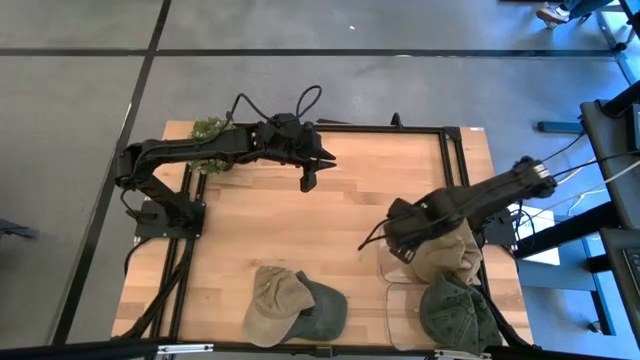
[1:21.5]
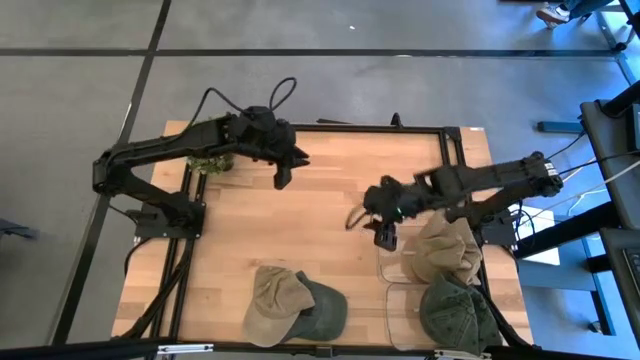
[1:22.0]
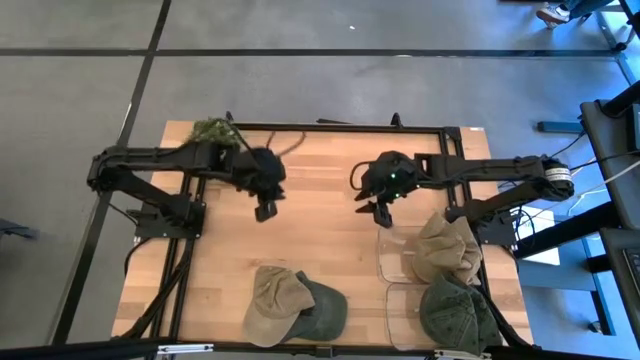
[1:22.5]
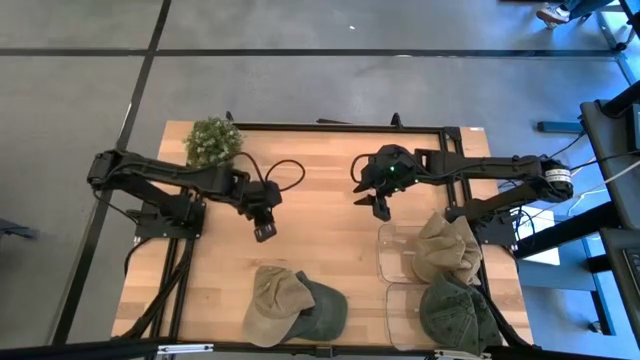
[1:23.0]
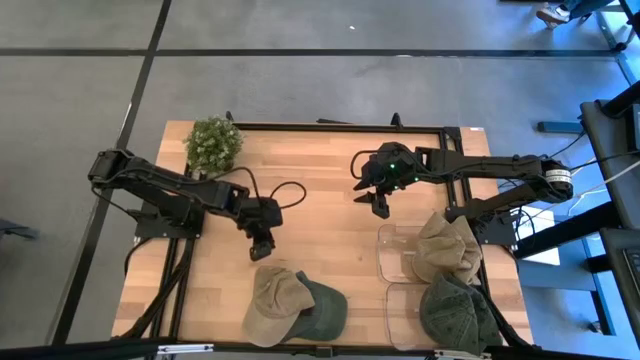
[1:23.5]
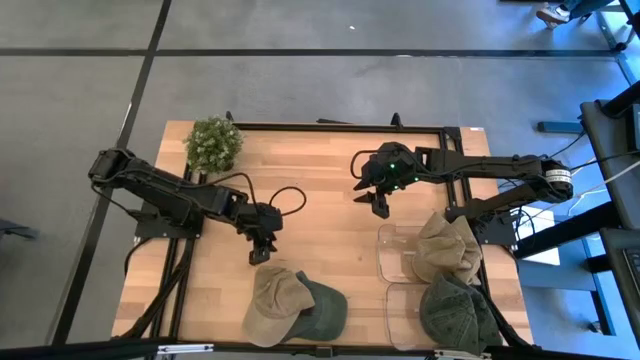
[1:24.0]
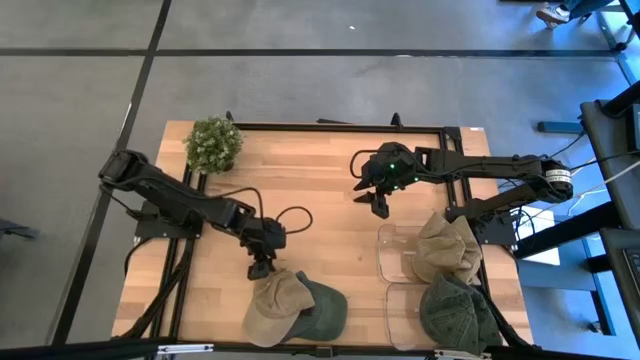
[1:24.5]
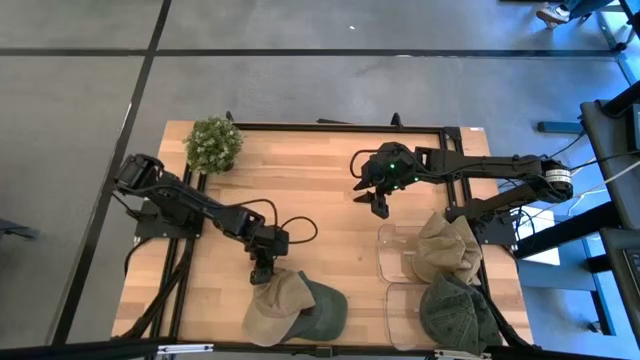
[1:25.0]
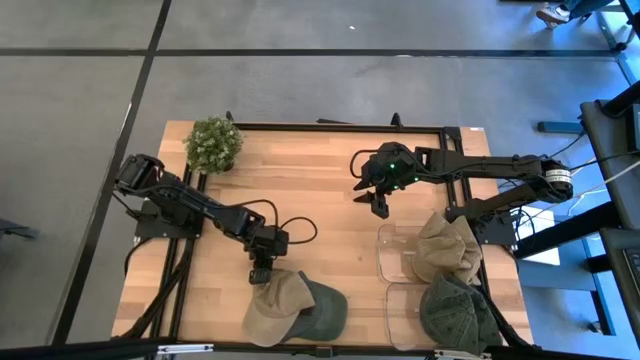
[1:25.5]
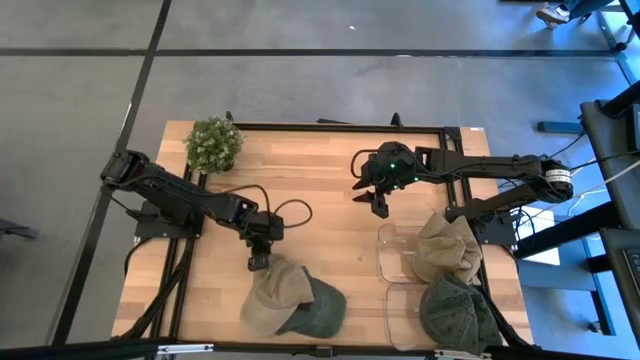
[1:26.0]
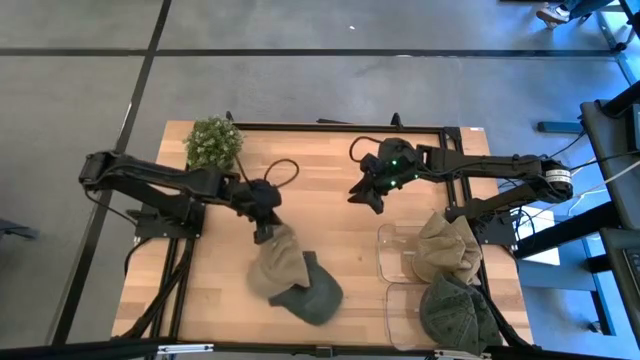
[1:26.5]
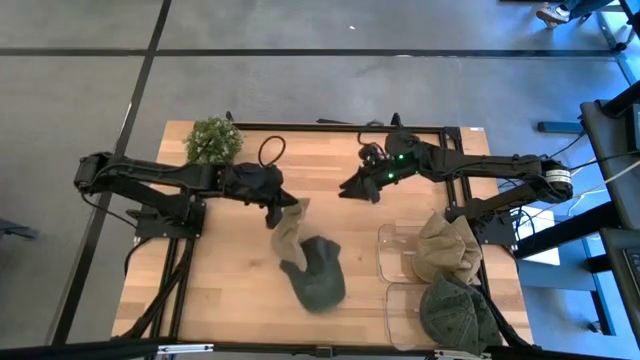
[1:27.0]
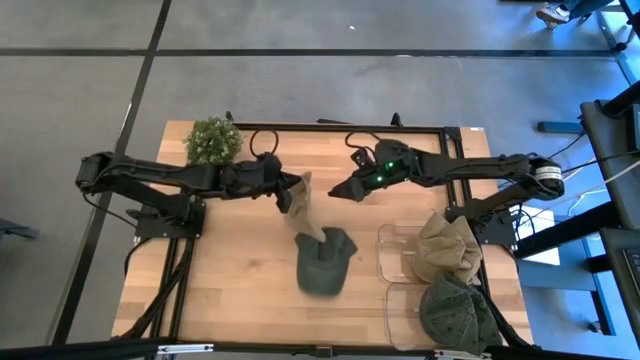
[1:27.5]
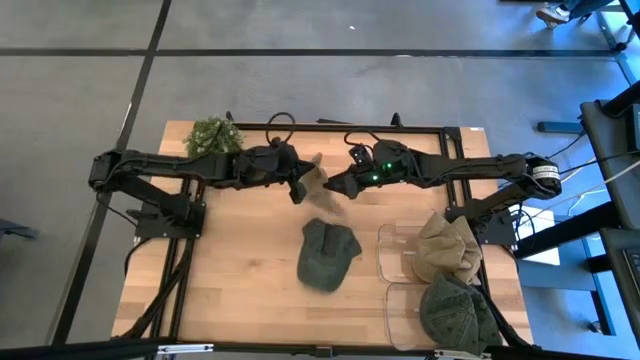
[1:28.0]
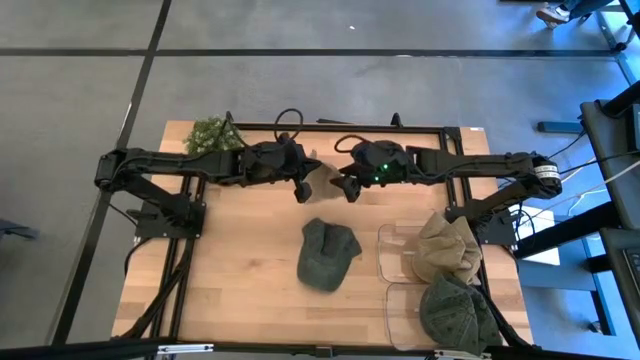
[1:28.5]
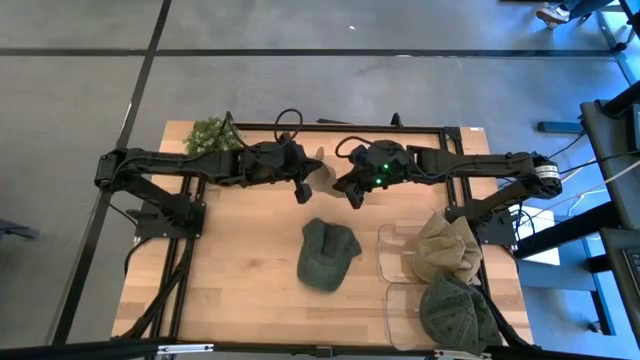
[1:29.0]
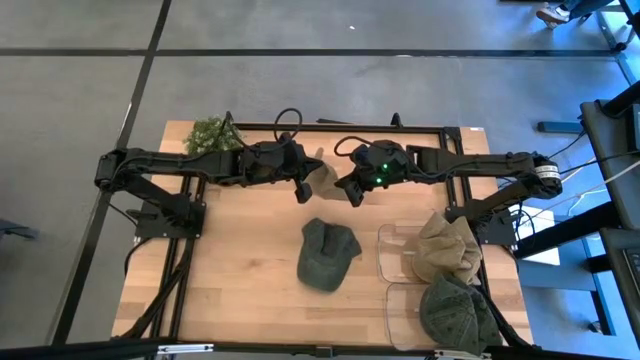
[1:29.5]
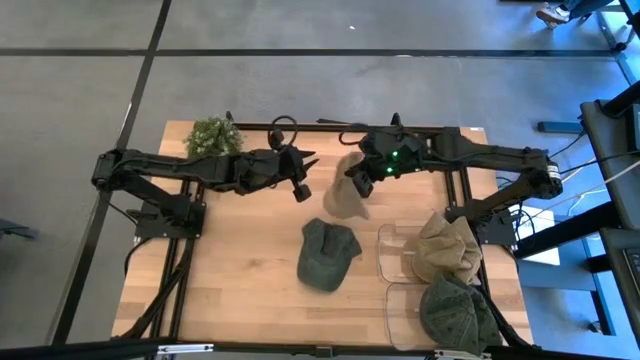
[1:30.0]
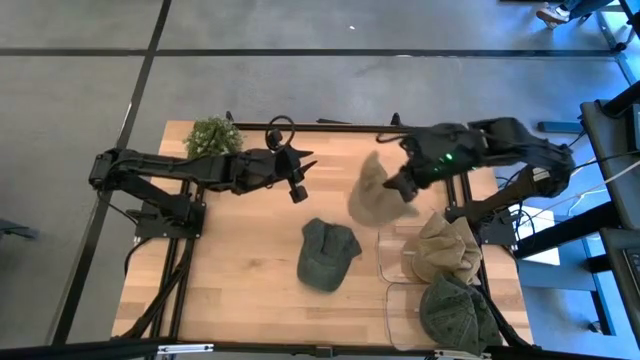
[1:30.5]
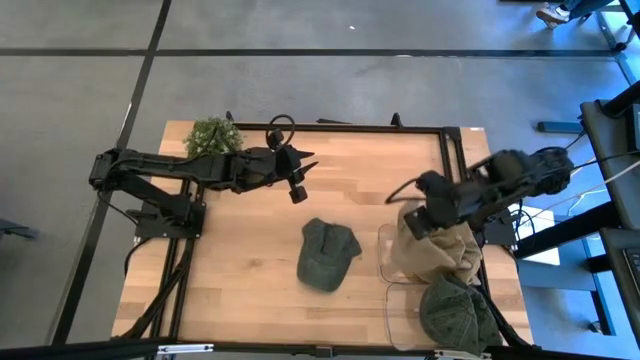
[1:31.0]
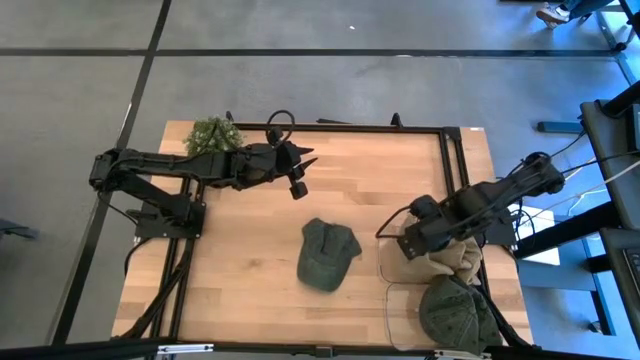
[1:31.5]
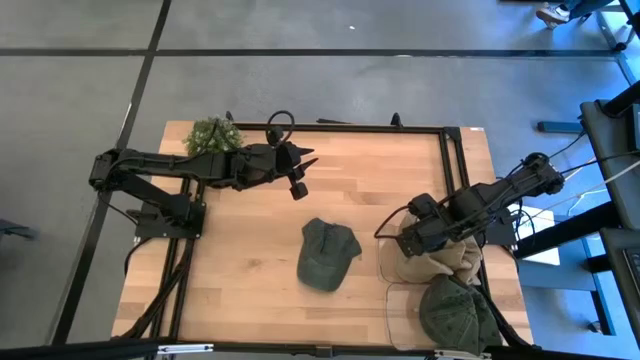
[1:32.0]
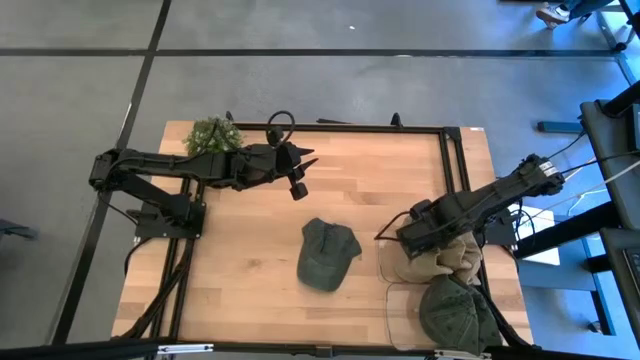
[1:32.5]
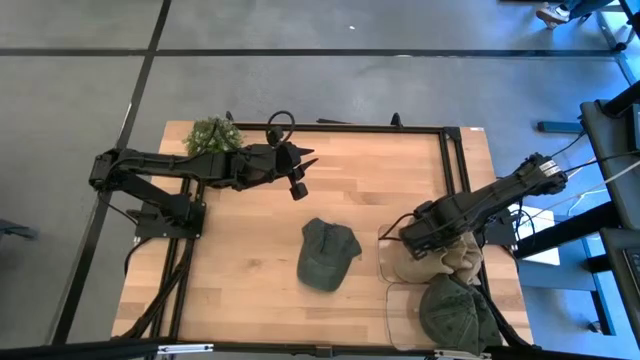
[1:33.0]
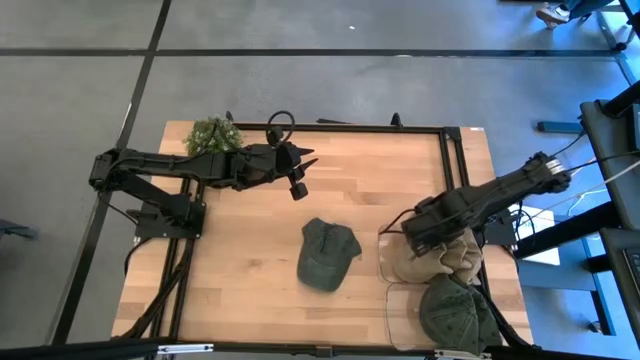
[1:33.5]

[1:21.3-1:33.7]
Task: Pick & Place hat
Put the brown cap into the top transparent bin

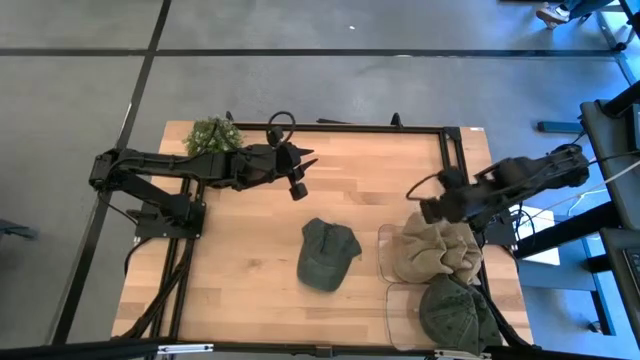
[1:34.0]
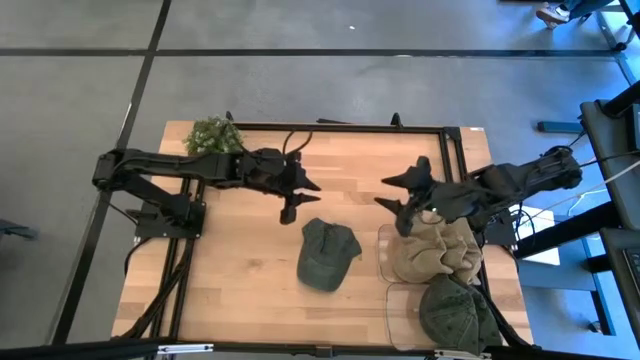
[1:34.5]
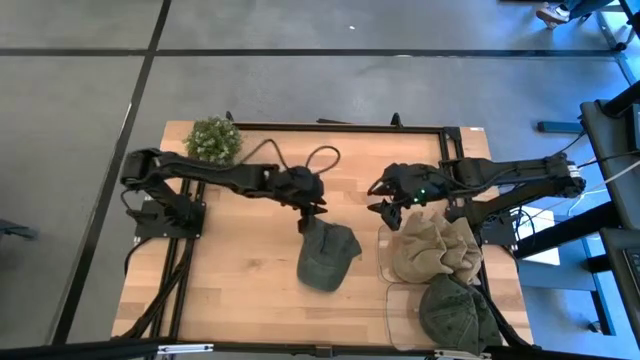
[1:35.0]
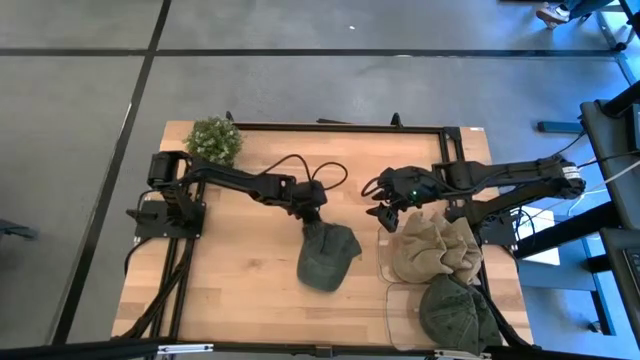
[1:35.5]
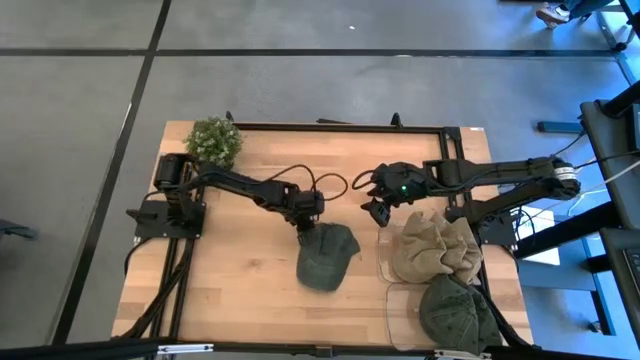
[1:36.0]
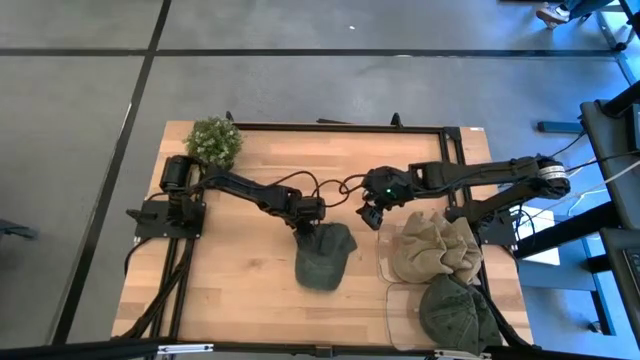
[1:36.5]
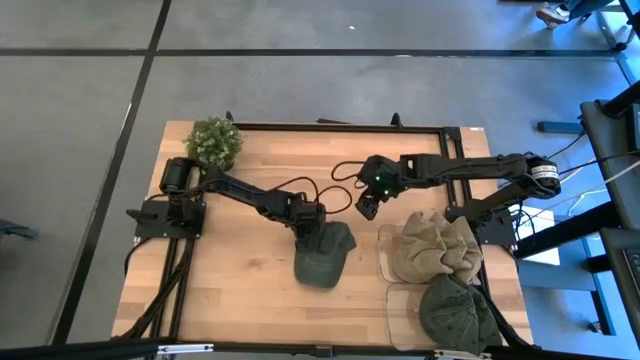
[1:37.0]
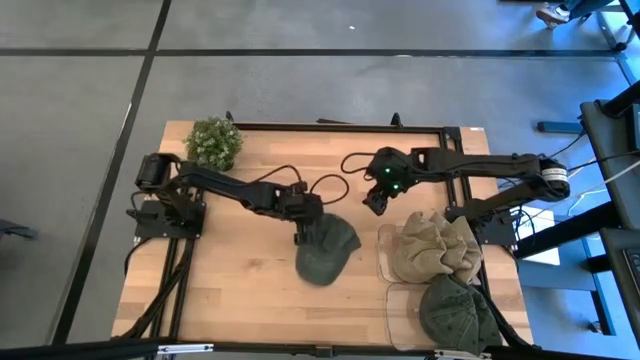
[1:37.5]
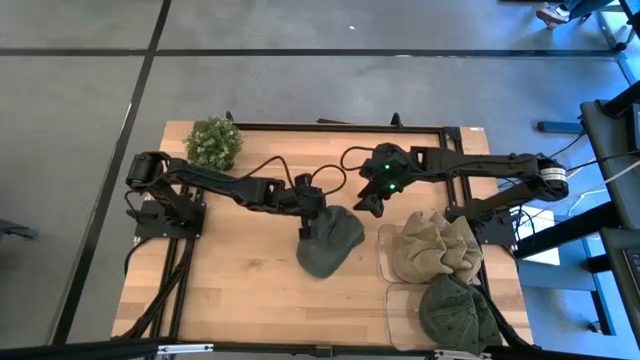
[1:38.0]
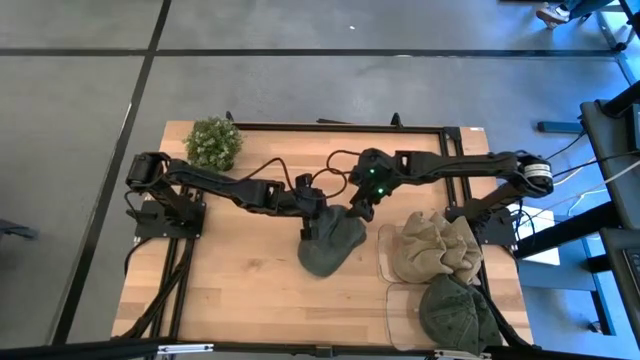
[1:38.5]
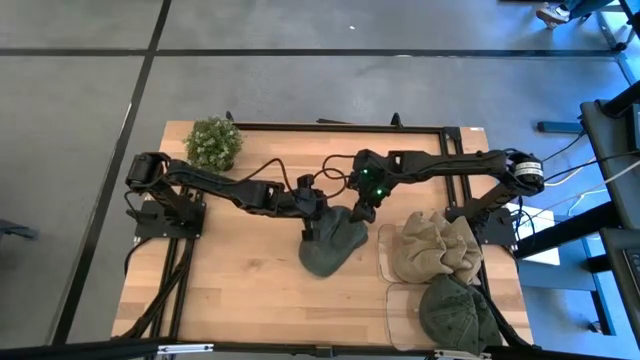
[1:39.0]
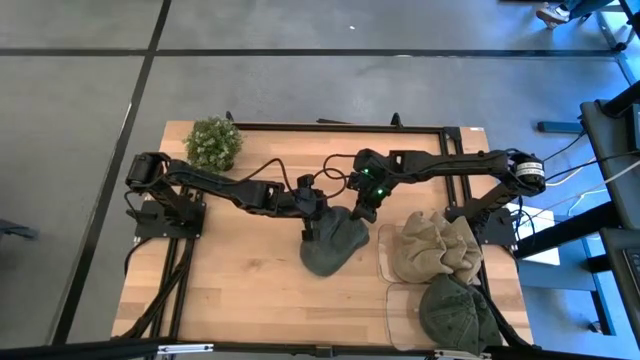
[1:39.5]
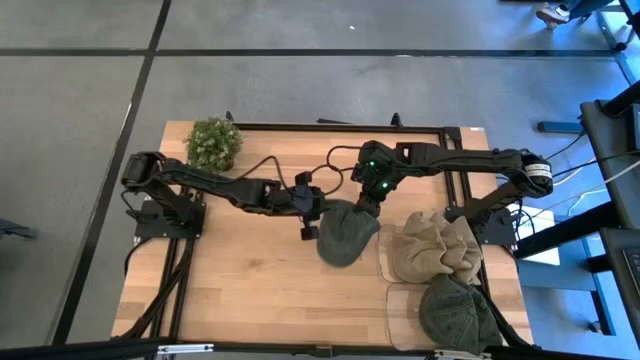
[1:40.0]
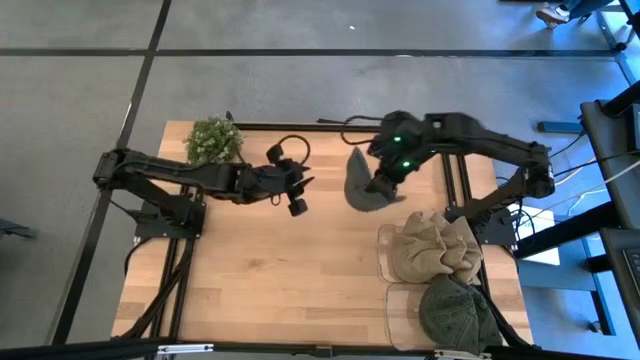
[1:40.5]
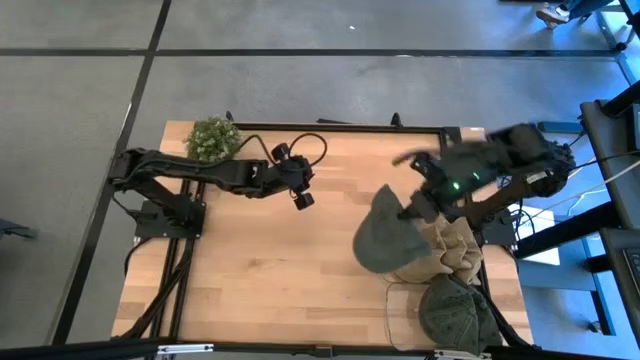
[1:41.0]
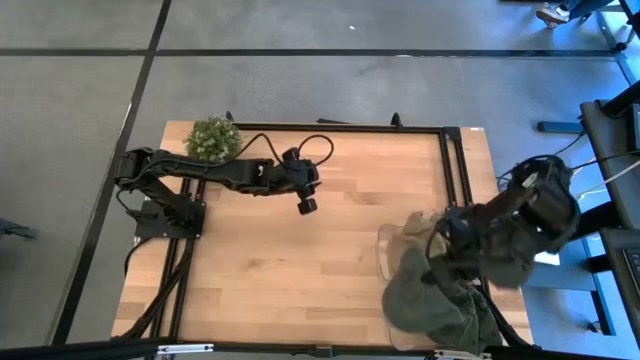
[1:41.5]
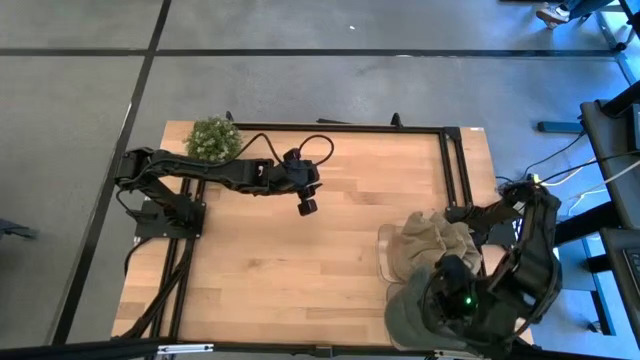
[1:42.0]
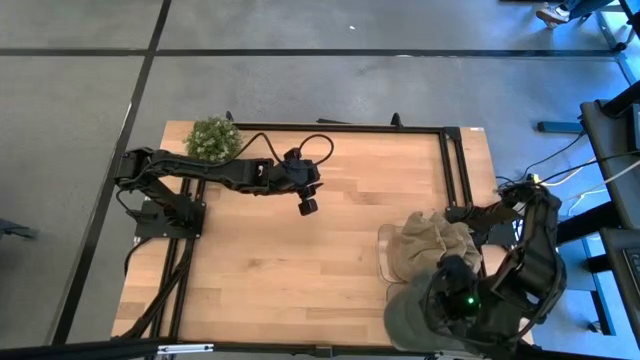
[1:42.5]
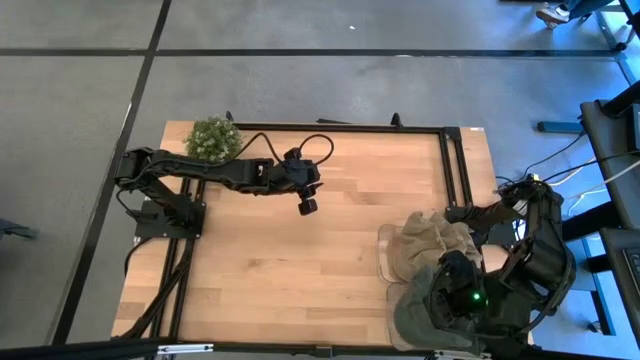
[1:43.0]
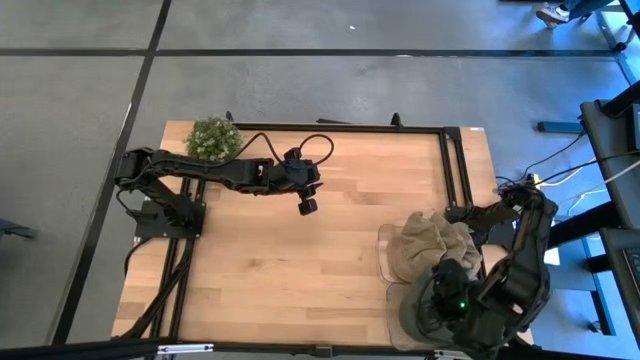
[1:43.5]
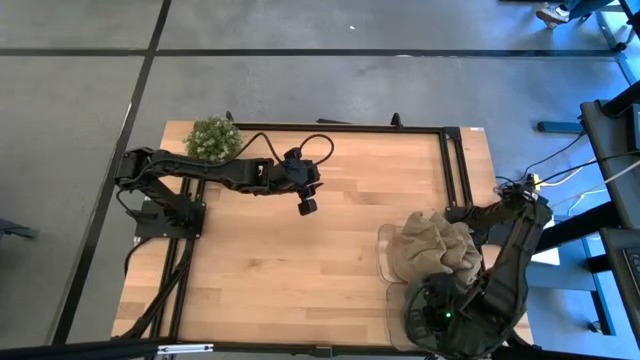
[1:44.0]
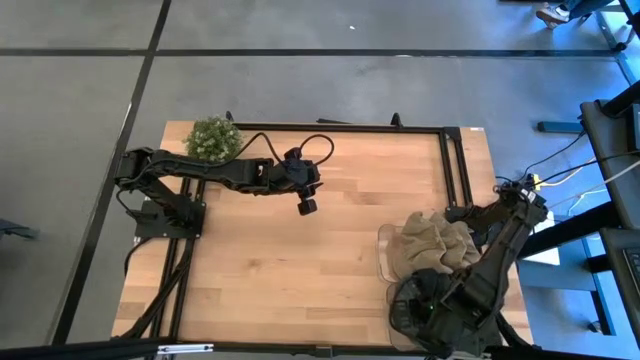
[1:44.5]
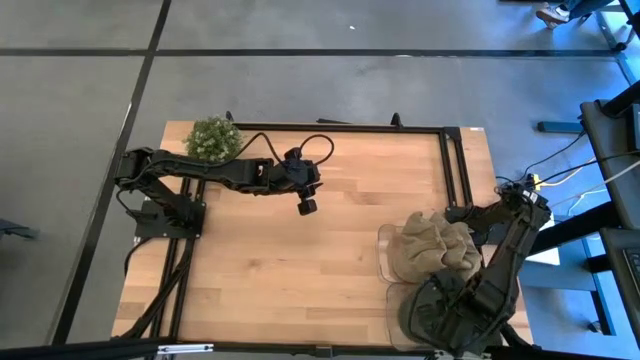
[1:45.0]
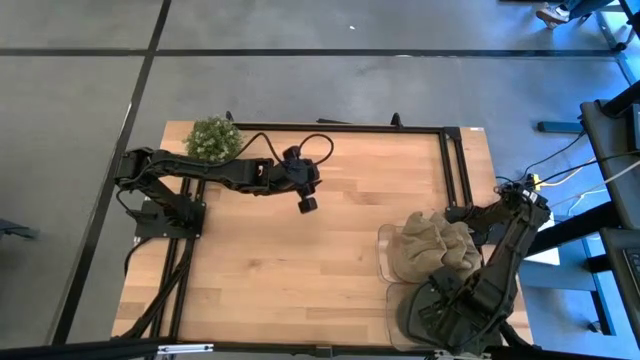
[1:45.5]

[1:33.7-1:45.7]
Put the black cap into the bottom transparent bin
